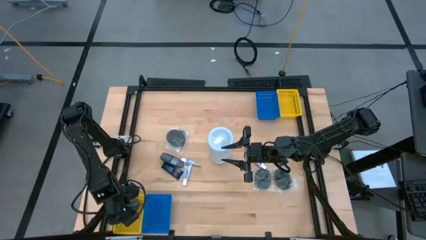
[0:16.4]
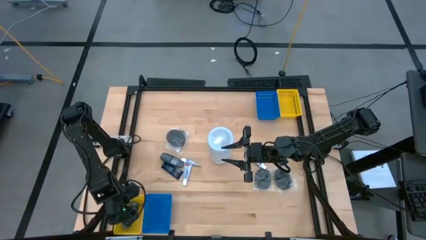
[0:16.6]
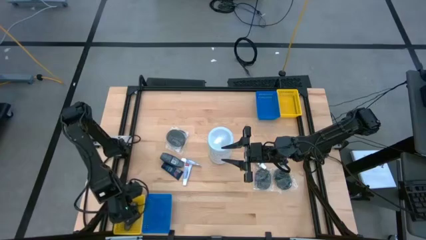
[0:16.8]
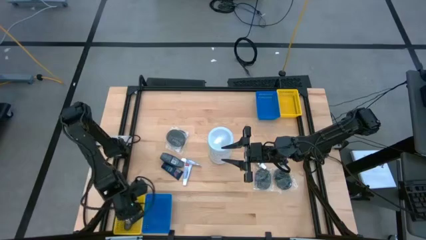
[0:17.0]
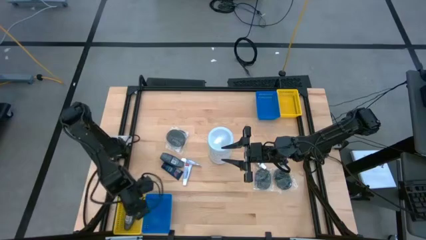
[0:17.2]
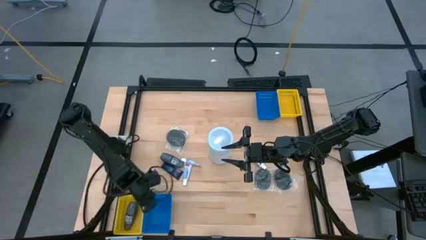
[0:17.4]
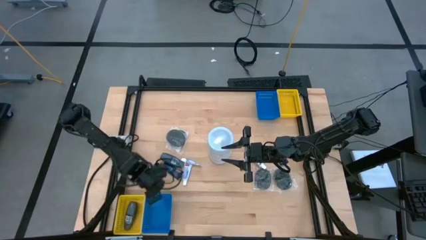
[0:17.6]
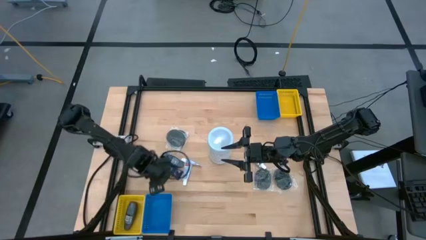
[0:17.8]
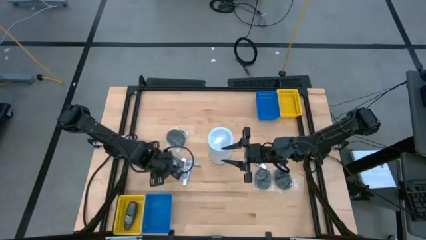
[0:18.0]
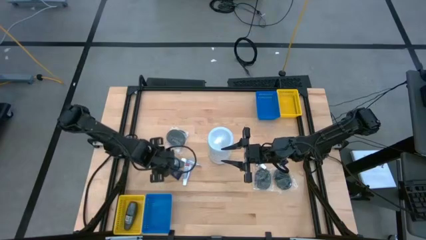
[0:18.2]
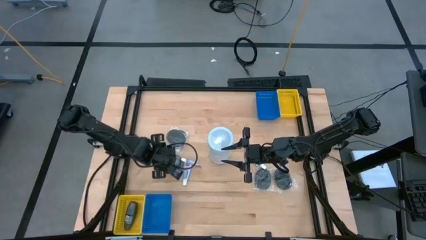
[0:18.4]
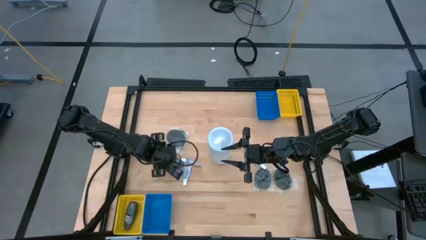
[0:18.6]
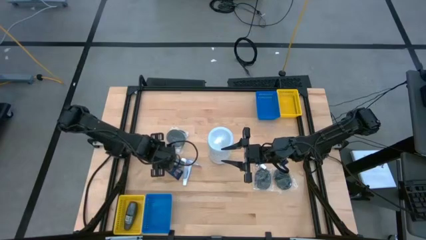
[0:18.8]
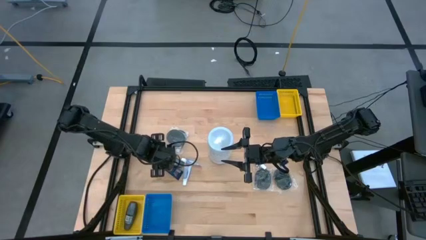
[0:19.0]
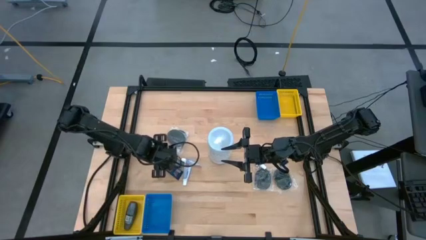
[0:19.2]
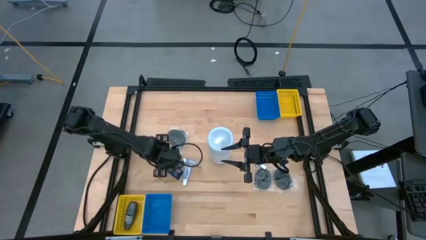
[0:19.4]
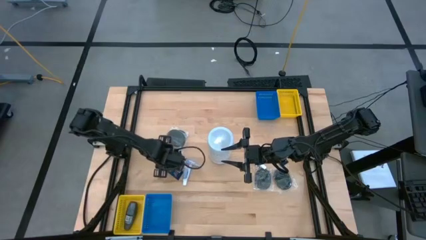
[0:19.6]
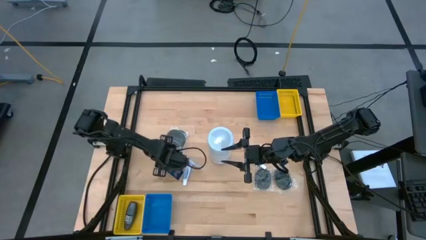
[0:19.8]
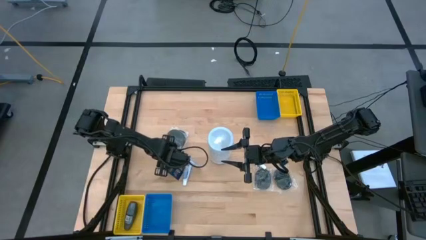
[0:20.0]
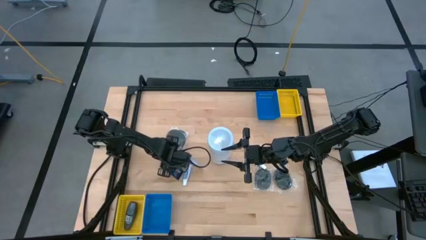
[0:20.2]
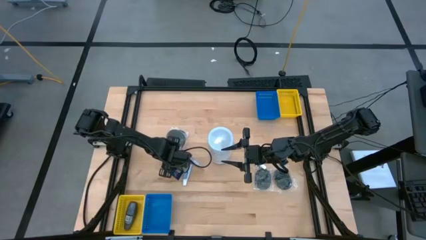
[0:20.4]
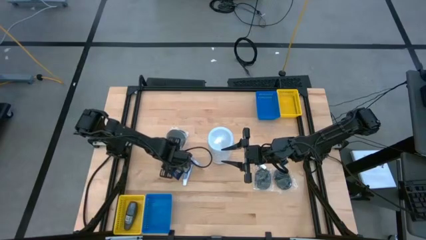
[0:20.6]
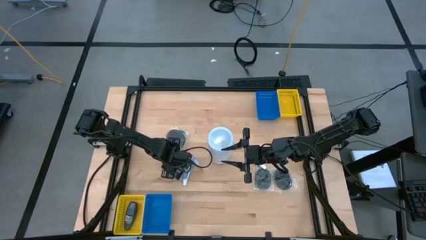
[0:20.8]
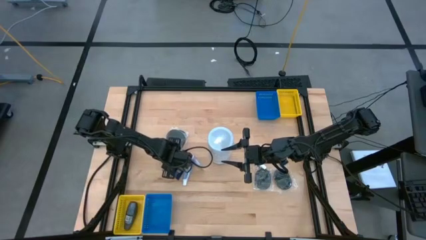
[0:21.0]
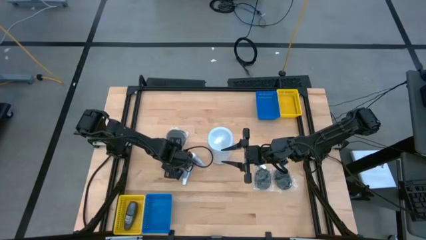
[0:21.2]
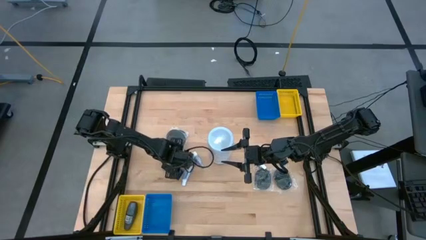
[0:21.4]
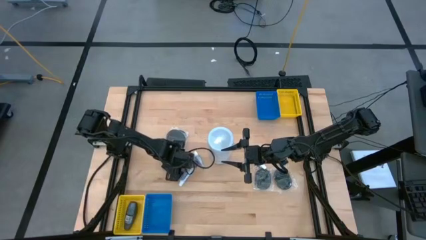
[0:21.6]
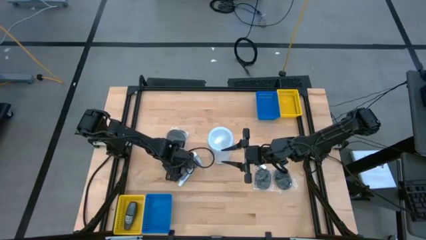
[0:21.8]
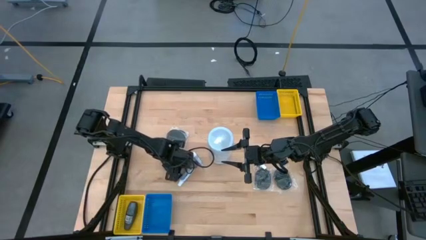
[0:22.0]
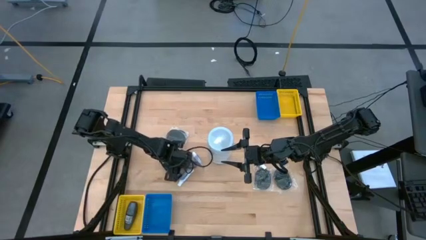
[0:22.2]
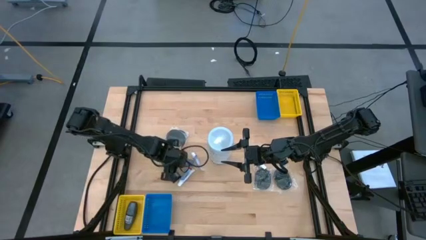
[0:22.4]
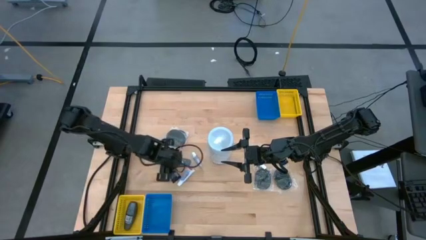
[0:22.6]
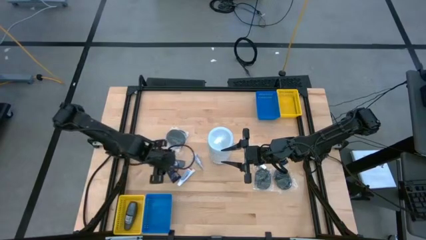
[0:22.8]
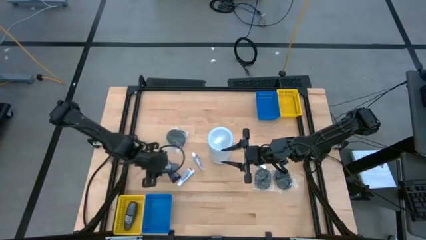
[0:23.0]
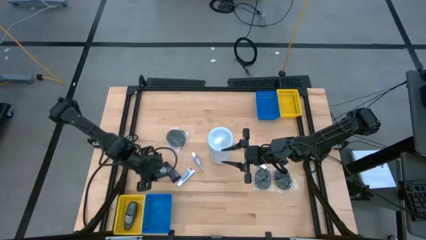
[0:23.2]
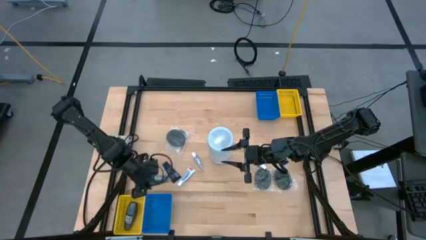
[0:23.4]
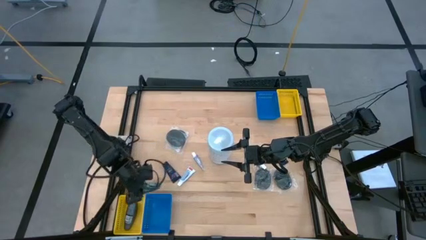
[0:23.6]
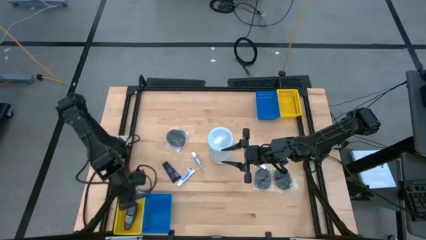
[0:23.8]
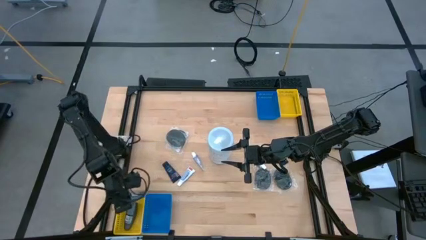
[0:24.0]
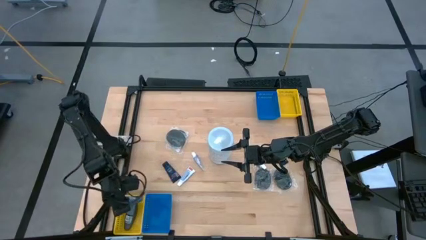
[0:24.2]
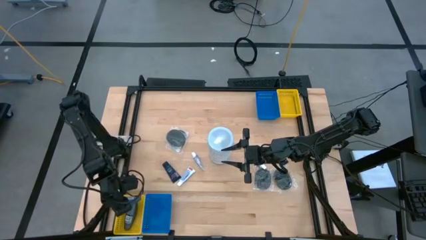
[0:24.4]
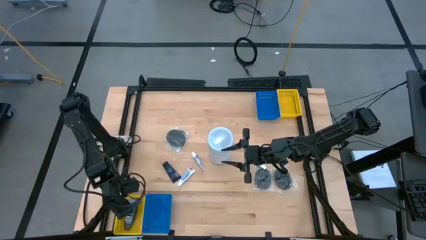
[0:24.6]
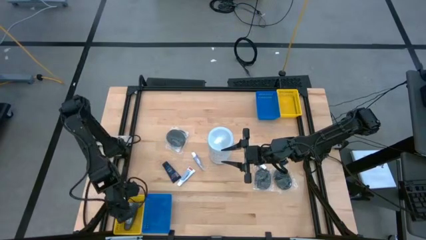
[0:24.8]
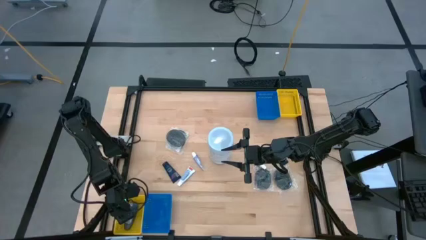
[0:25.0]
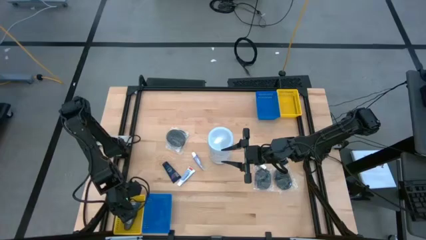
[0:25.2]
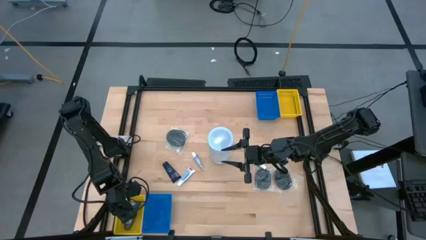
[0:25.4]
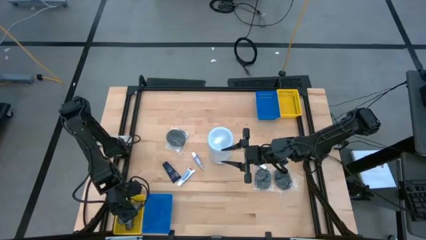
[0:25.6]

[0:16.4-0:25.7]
Task: Pick & Place Travel size toiletries
Put the black roll-on bottle into the bottom yellow bin

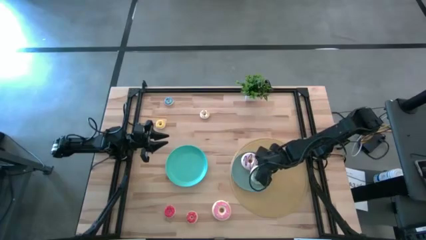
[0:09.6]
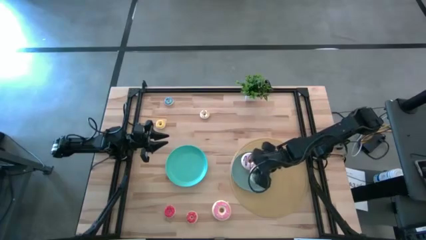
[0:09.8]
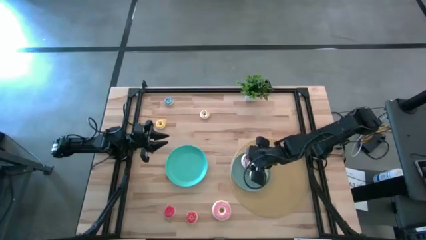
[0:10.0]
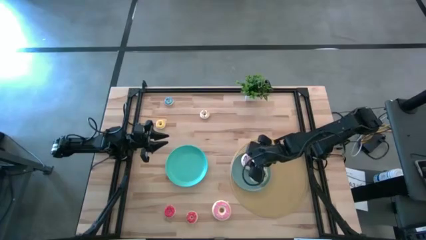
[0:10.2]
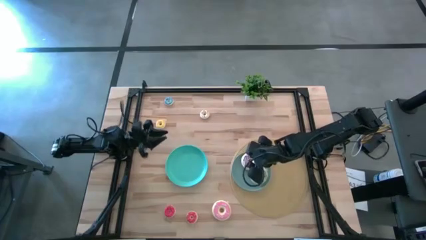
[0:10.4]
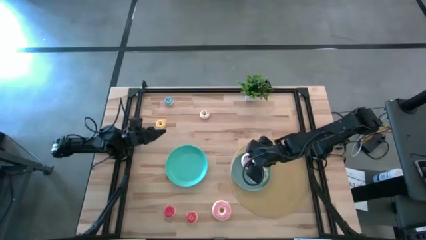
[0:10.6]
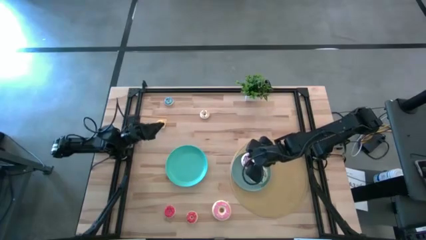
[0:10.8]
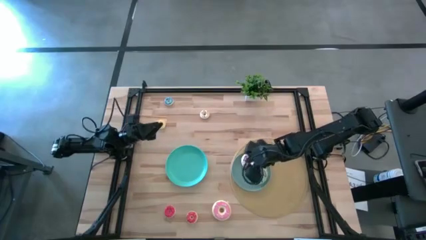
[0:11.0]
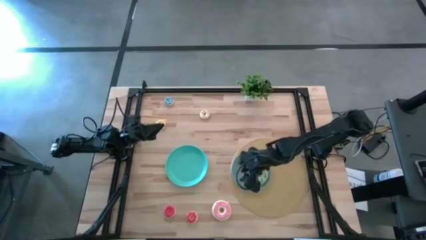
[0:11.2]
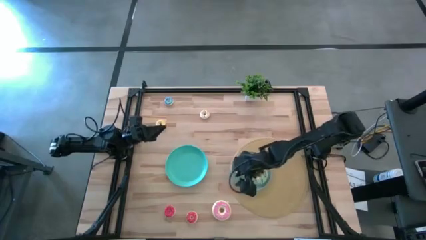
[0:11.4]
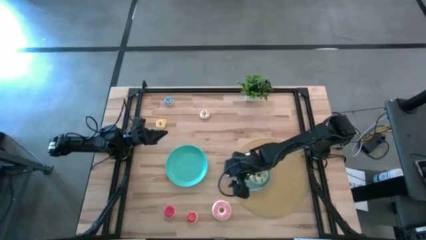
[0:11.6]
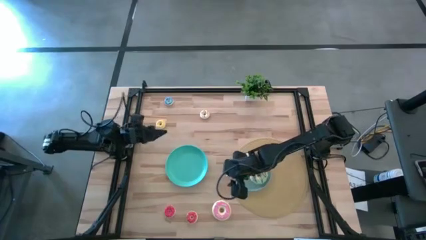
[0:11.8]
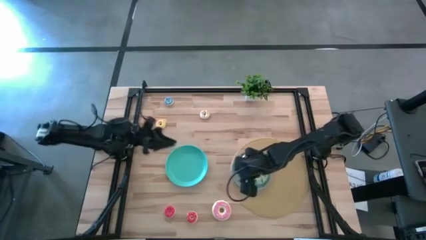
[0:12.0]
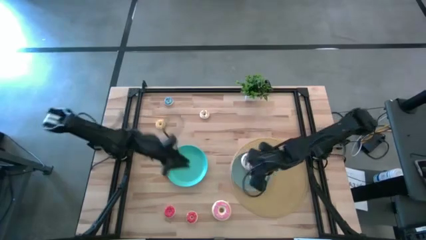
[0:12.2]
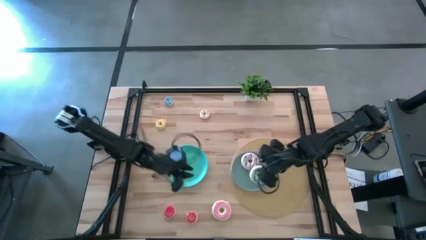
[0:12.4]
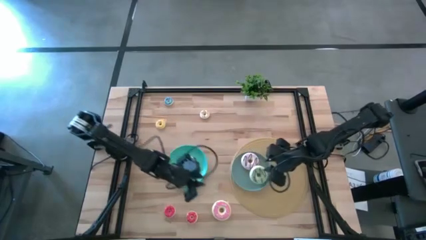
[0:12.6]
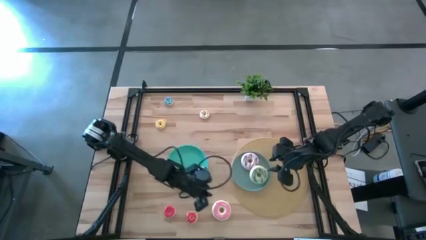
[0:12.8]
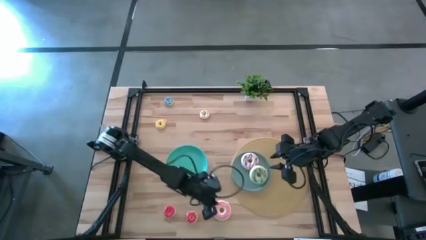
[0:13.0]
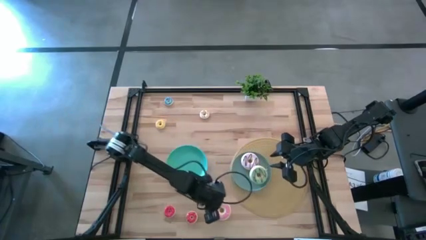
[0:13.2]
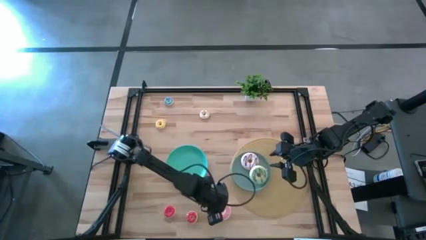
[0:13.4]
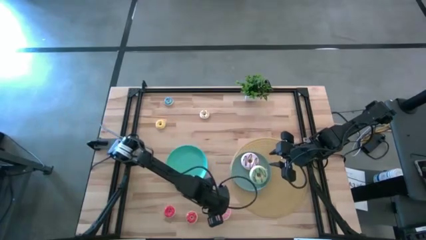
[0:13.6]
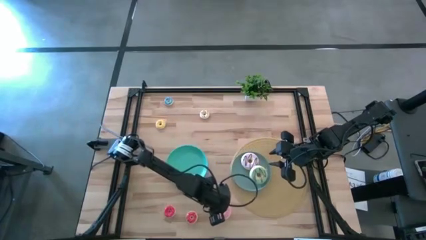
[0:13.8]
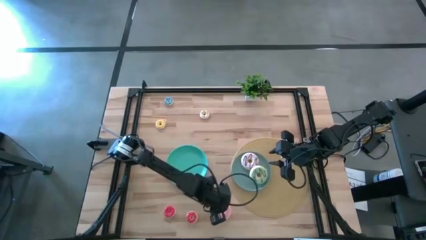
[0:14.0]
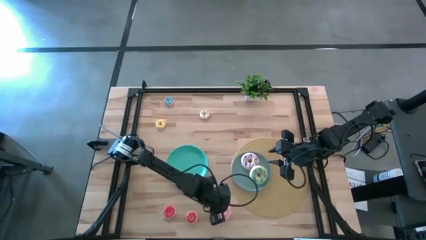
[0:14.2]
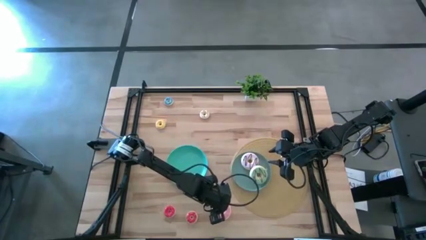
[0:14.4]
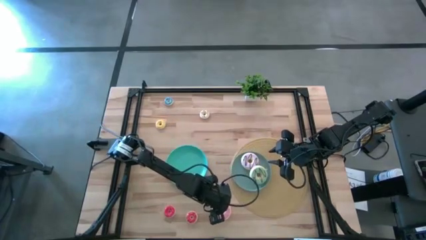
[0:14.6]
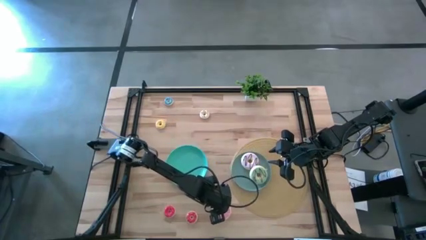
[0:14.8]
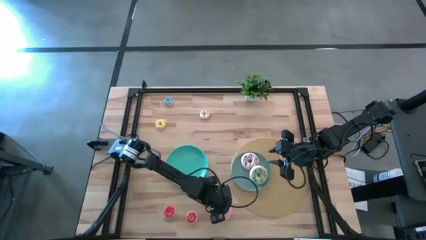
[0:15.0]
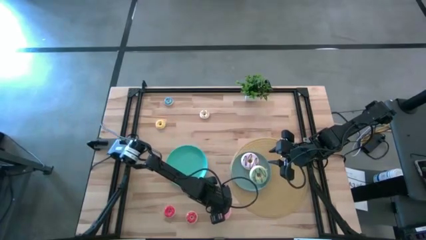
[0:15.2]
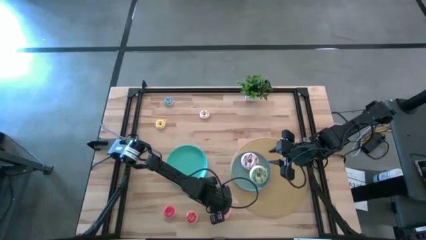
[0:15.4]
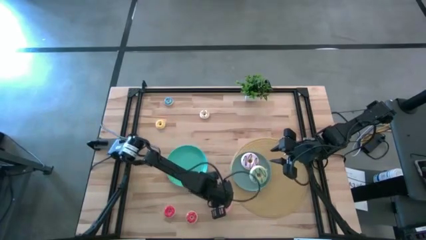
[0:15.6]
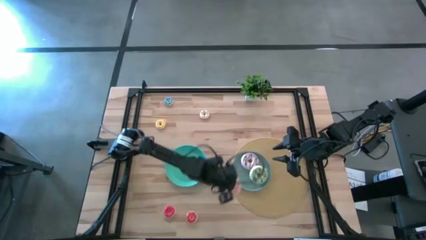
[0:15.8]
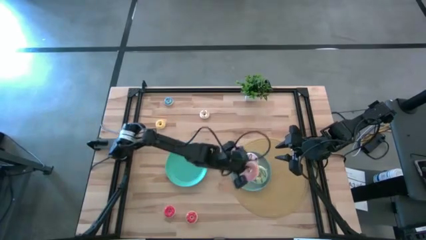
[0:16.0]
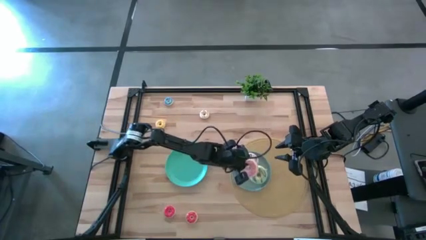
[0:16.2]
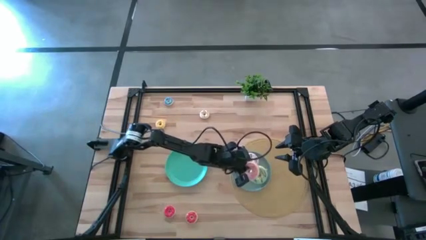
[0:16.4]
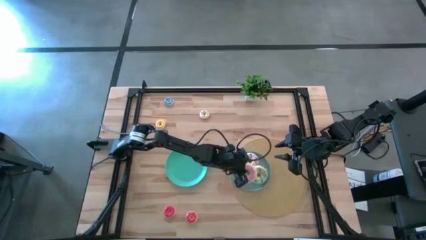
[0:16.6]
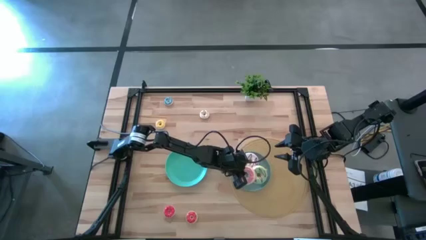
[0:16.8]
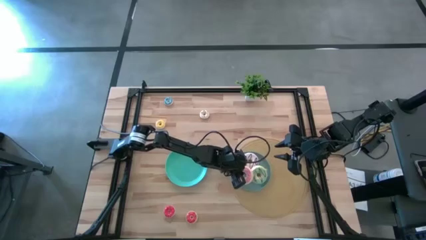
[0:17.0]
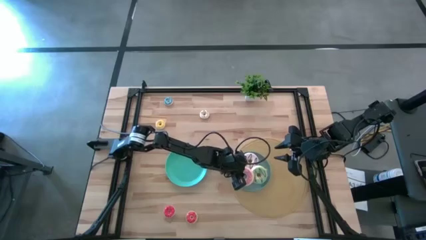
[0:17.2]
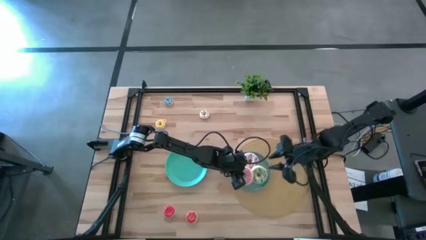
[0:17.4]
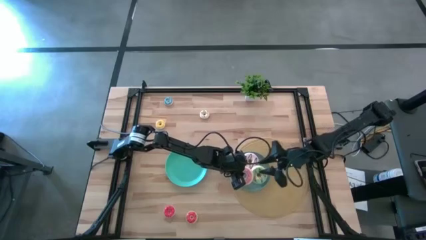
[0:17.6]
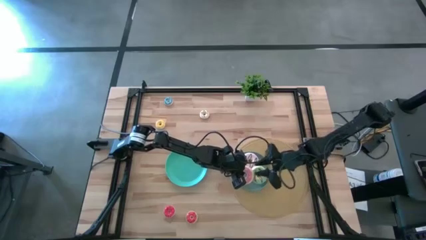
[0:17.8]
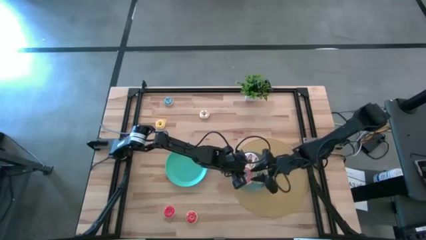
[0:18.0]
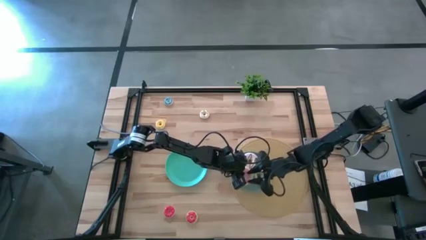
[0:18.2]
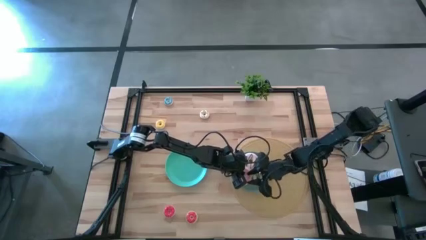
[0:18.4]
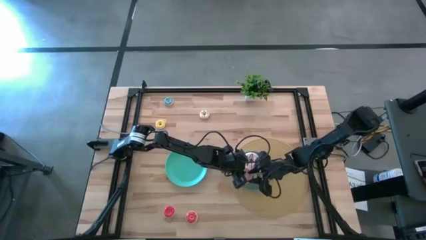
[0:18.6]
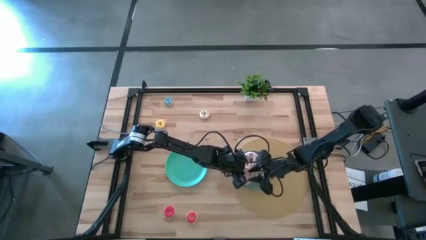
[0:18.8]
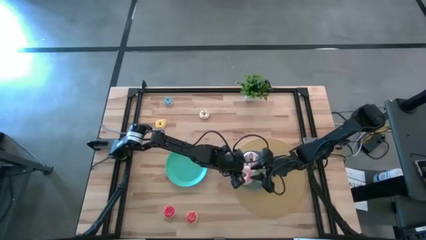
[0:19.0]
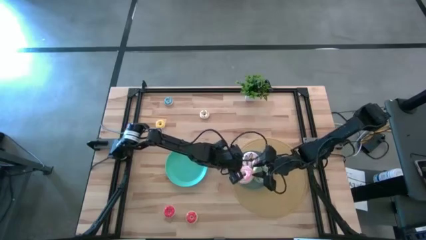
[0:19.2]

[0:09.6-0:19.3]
Task: Pick & Place donuts
Put the large pink donut on the gray plate
